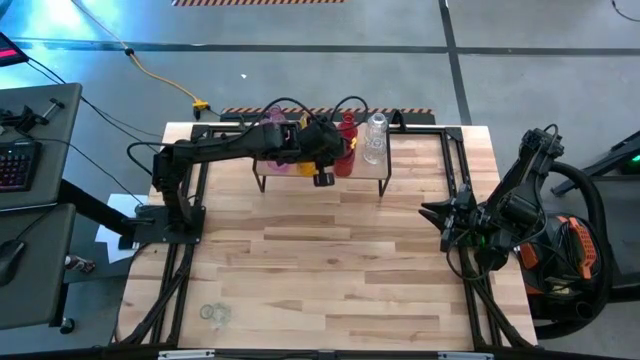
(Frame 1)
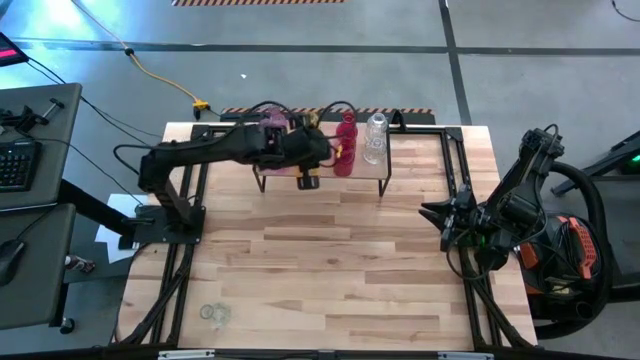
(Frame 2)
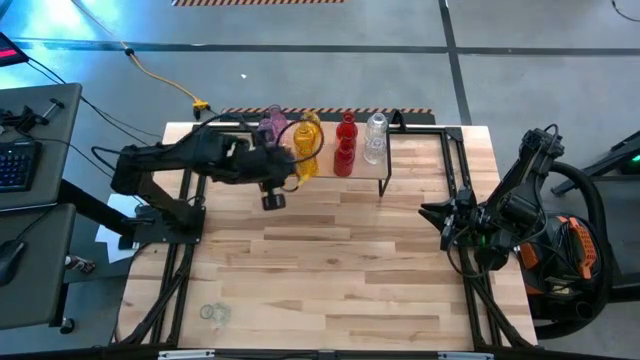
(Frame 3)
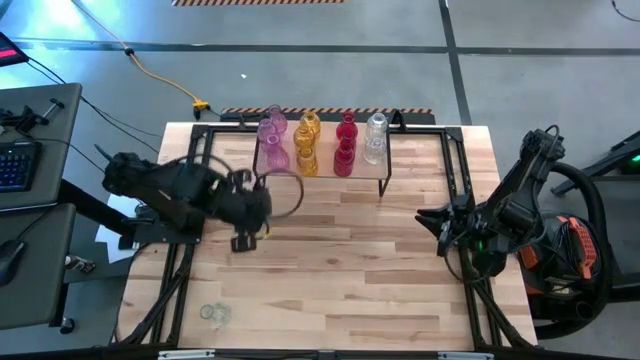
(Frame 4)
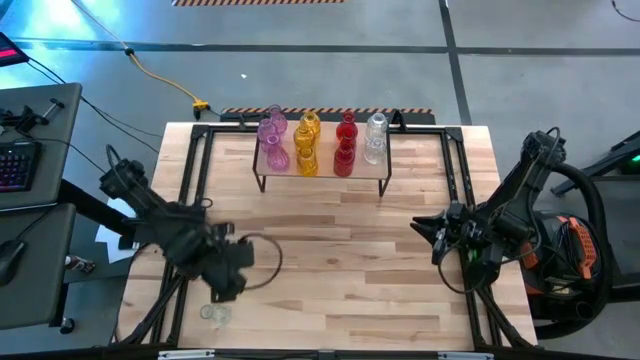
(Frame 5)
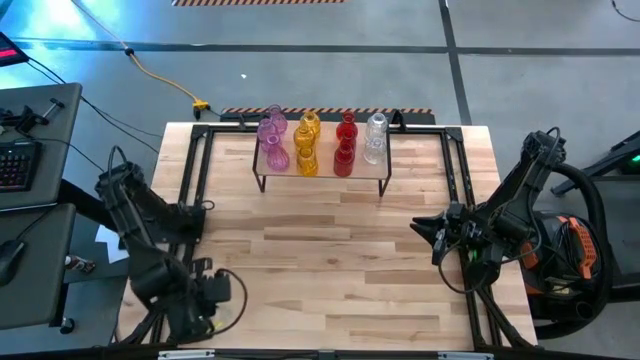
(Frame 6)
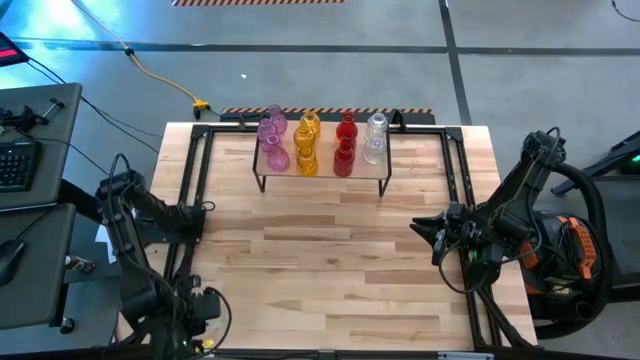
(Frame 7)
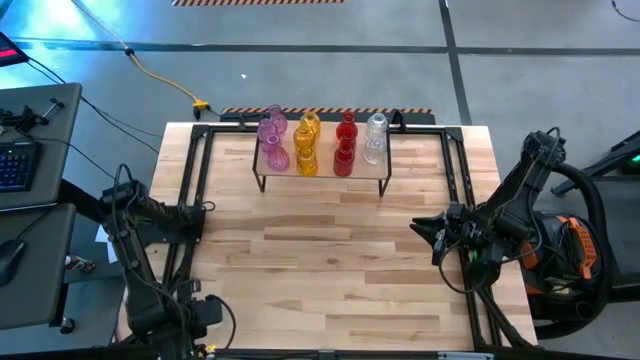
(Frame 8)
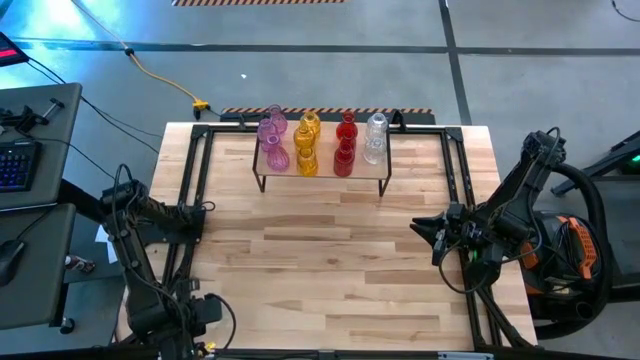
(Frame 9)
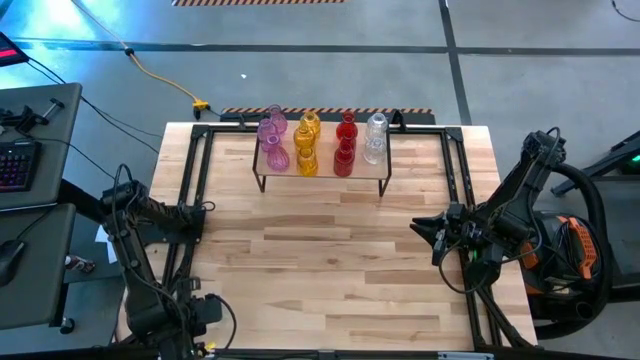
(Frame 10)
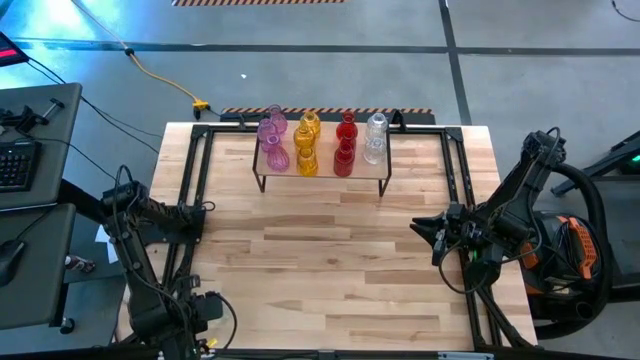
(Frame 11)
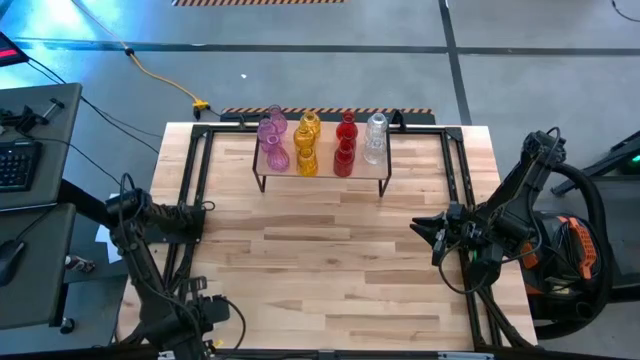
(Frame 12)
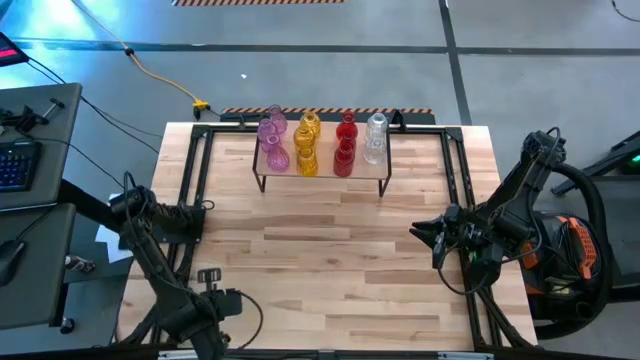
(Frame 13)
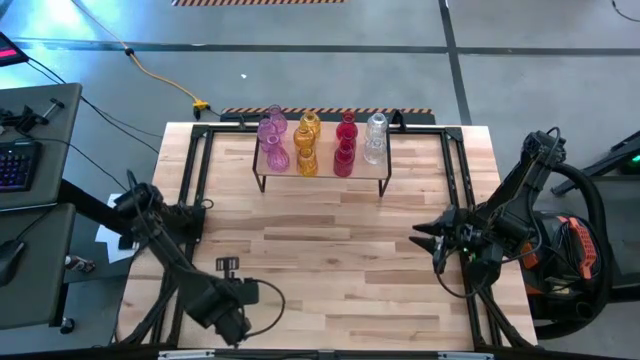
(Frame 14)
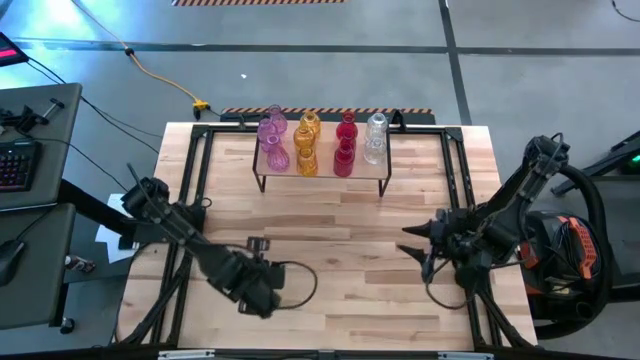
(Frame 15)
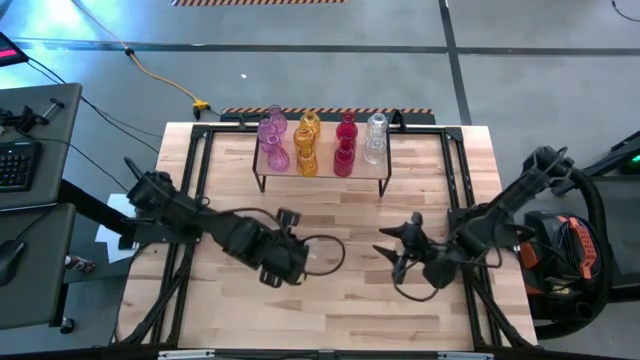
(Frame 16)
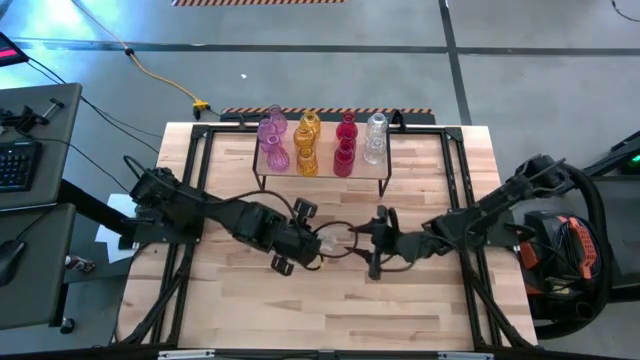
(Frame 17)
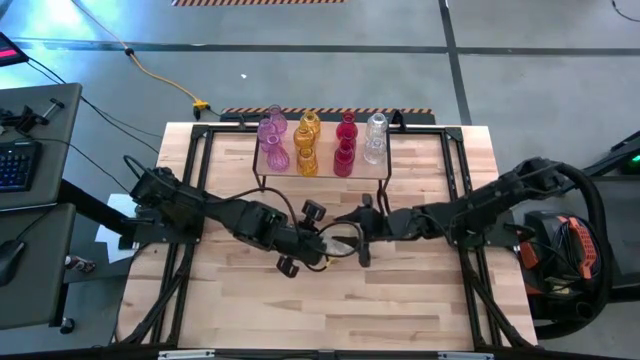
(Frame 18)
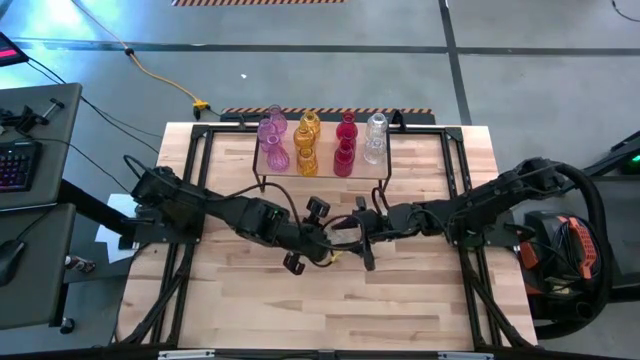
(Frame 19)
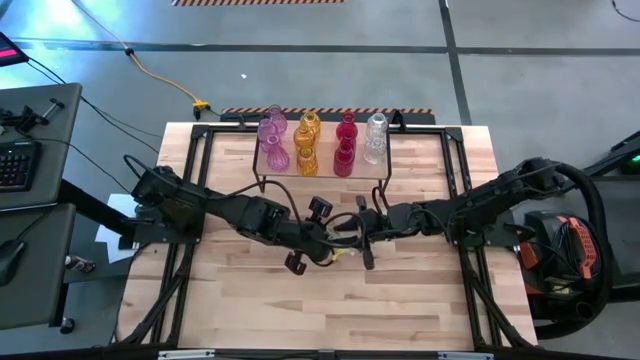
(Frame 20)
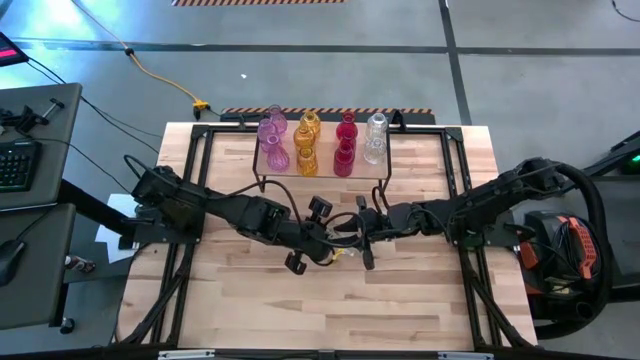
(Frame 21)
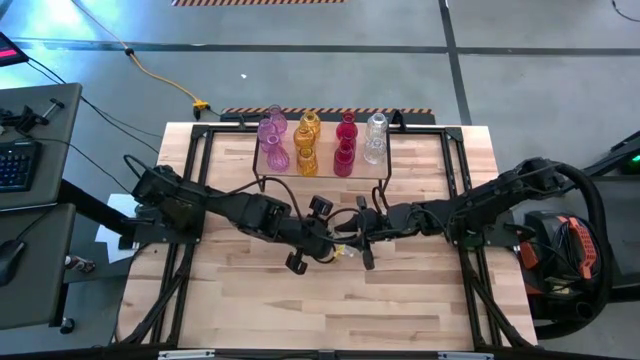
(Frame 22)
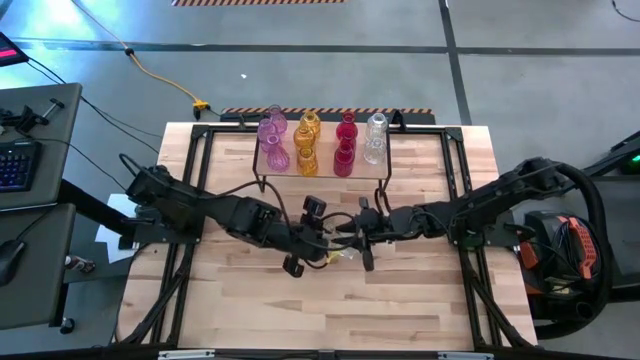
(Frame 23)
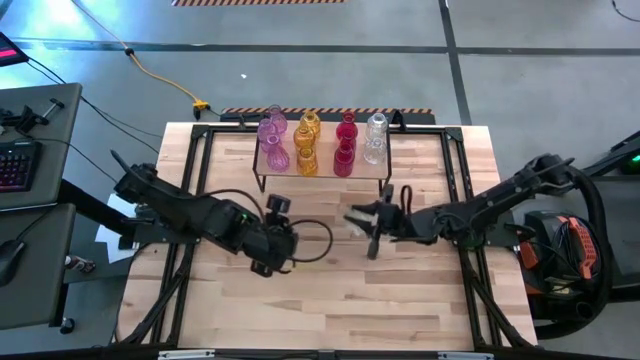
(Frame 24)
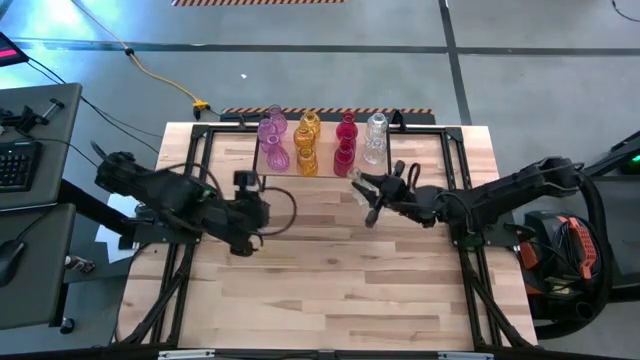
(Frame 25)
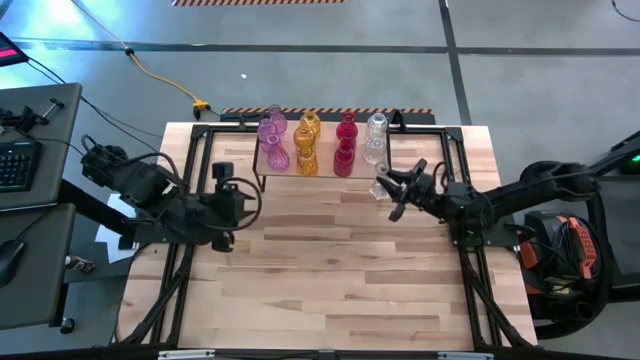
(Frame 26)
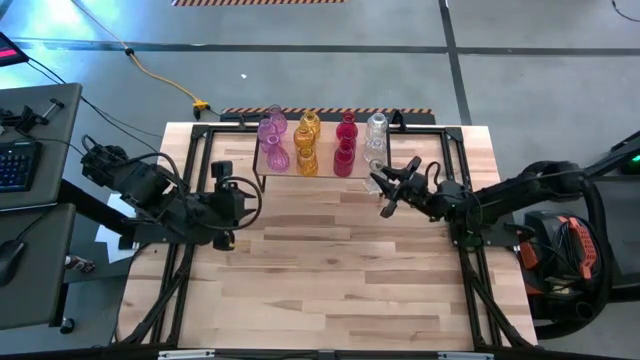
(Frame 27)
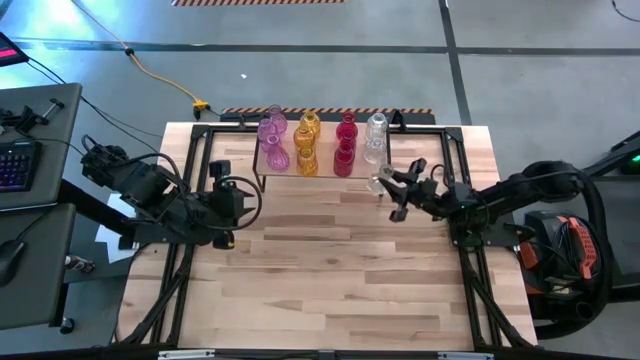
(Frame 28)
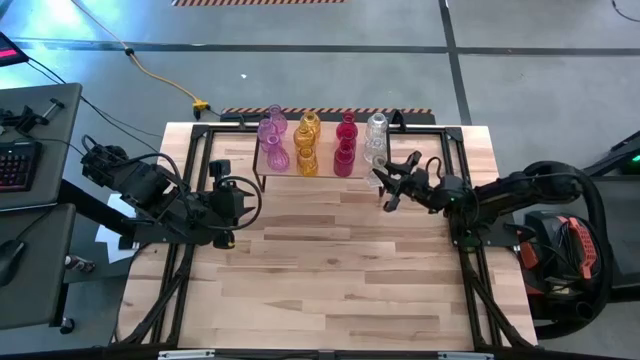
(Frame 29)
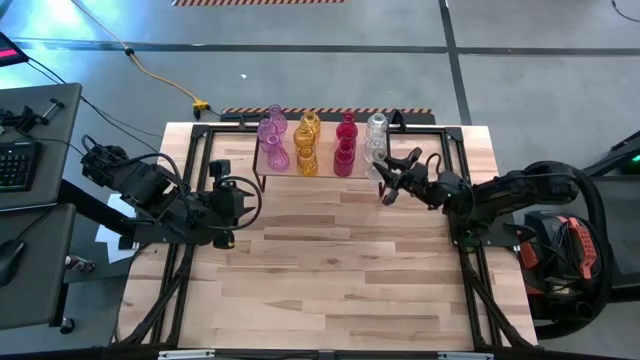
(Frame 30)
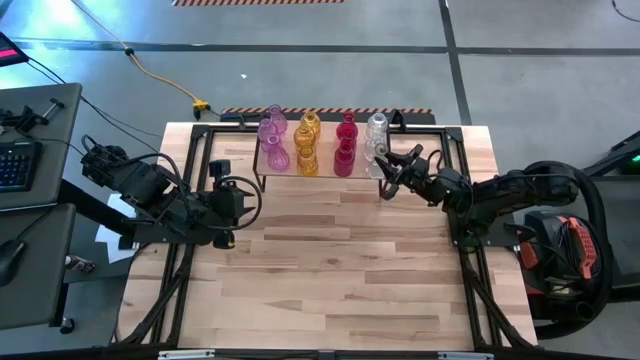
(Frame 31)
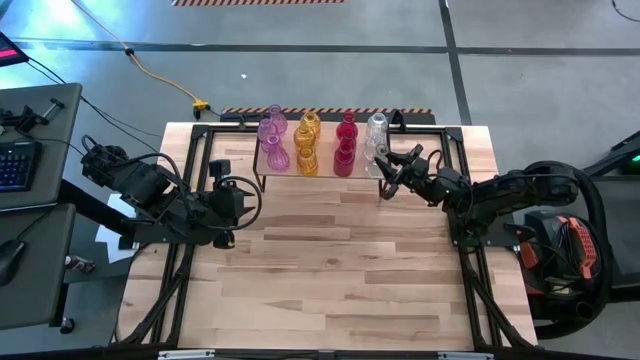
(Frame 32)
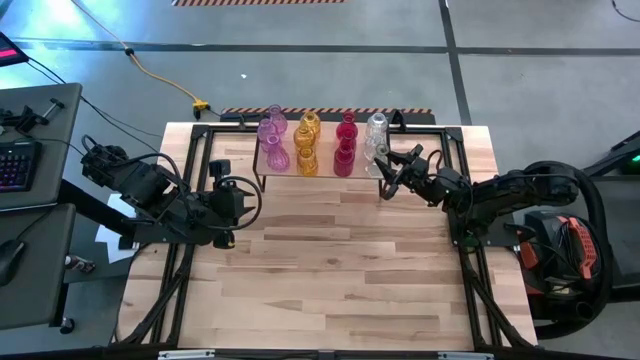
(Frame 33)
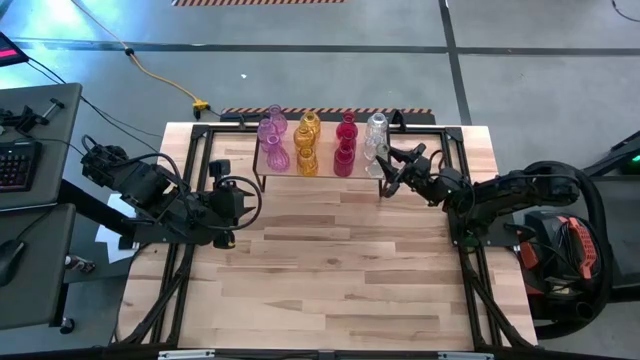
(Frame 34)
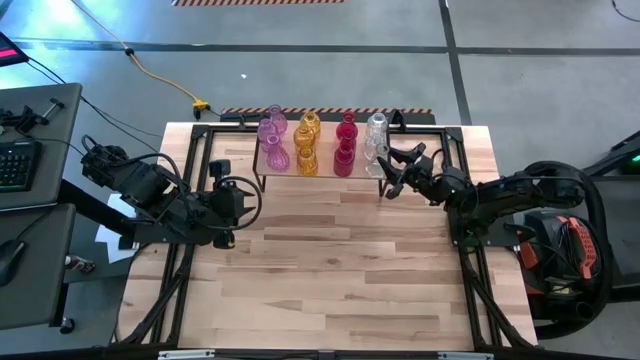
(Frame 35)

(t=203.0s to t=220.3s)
Task: sort vases onto shelf
Put the transparent vase on the shelf aligned with the other transparent vases

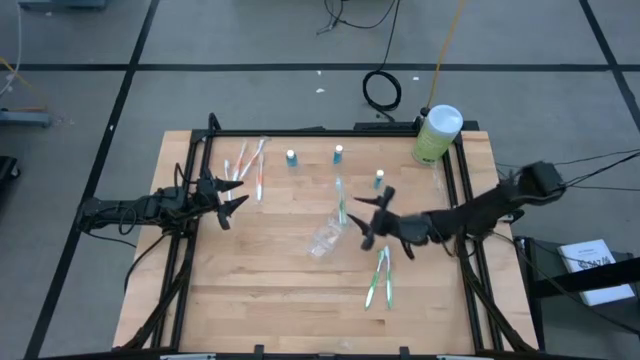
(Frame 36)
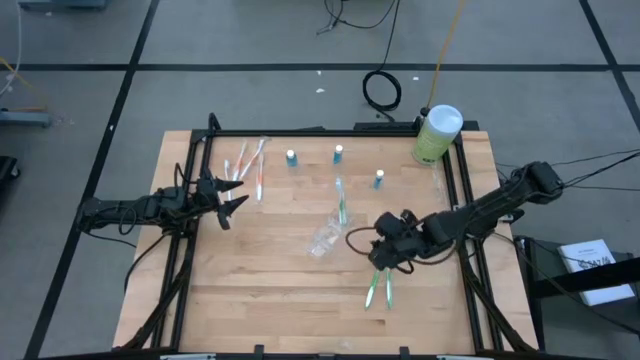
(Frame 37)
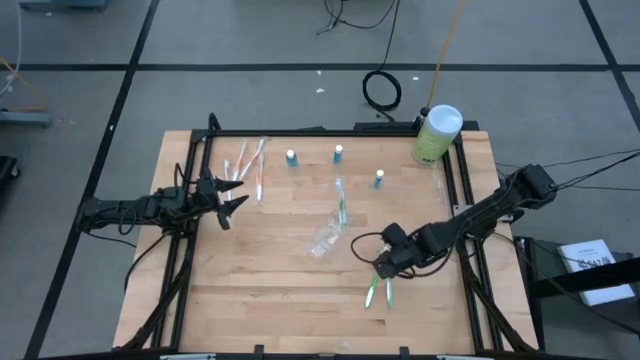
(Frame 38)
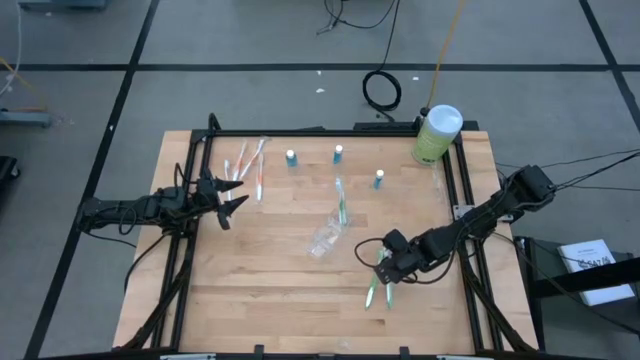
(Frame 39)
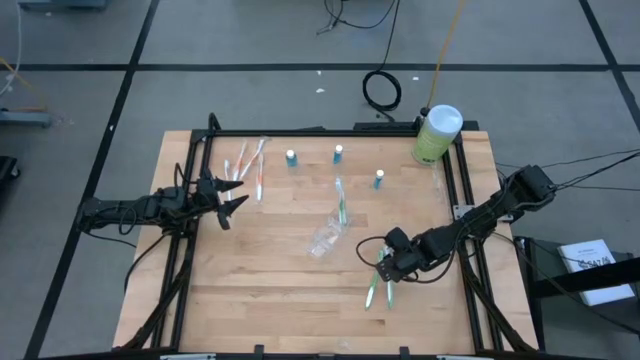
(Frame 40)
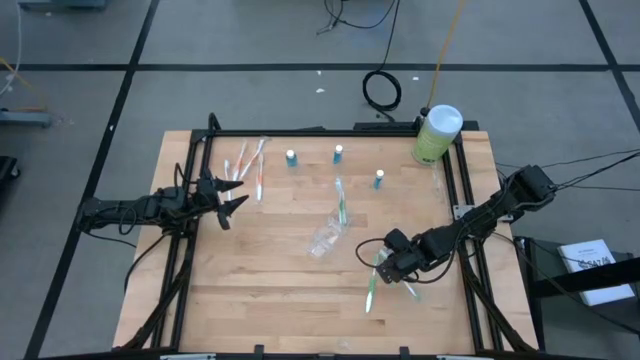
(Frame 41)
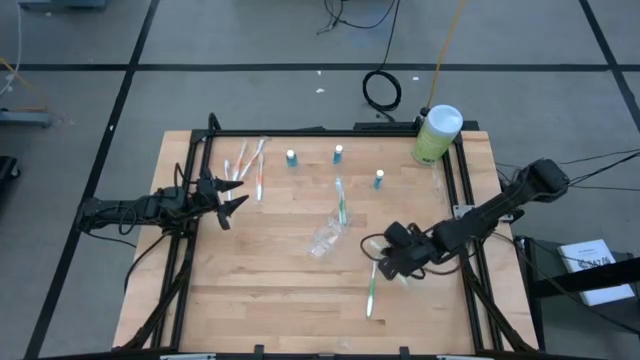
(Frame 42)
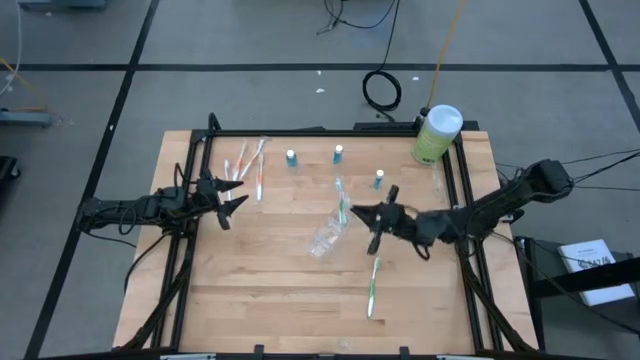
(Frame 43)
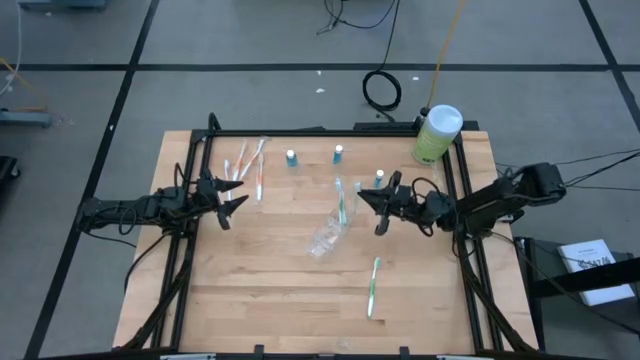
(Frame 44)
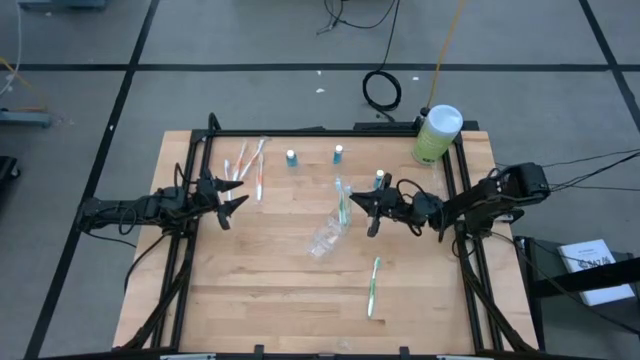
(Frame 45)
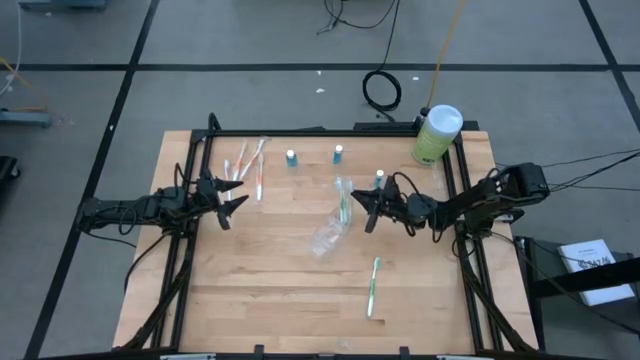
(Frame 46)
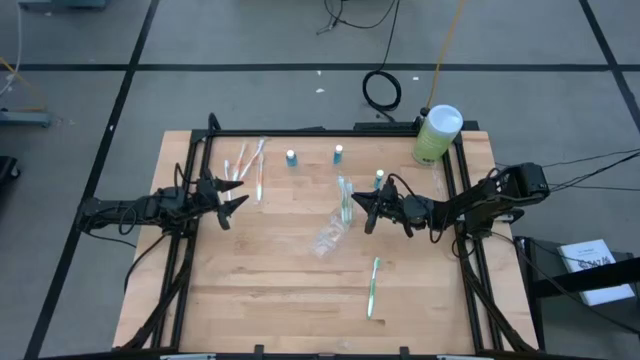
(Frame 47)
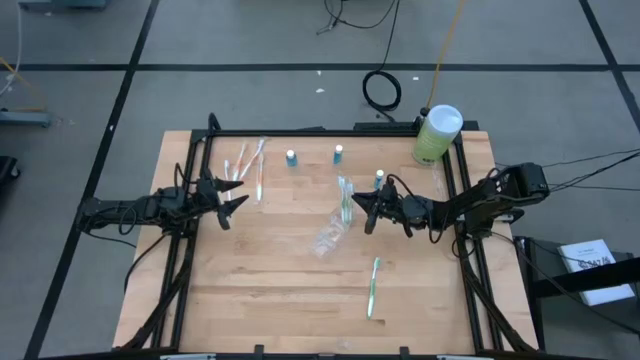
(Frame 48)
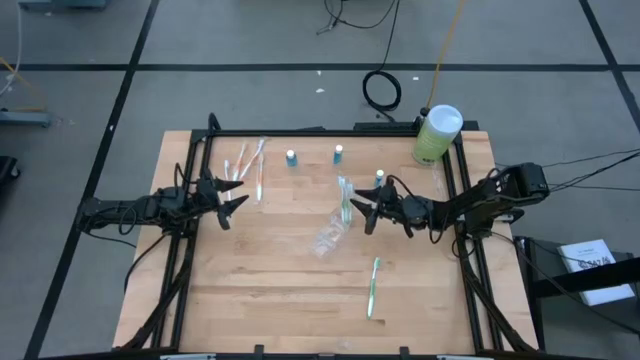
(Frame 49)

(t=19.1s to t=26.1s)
Task: Pick & Place toothbrushing station
Put the green toothbrush into the transparent organizer
